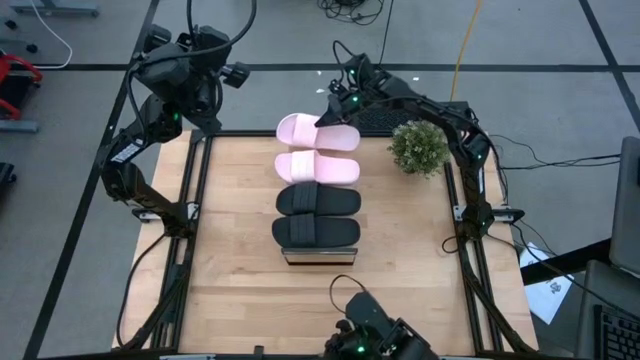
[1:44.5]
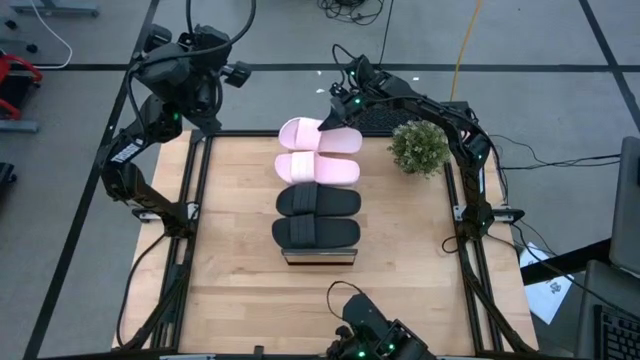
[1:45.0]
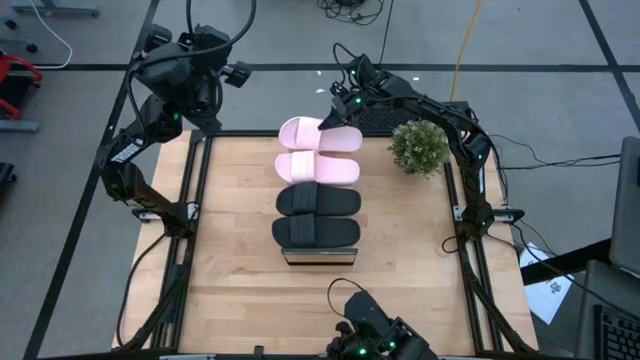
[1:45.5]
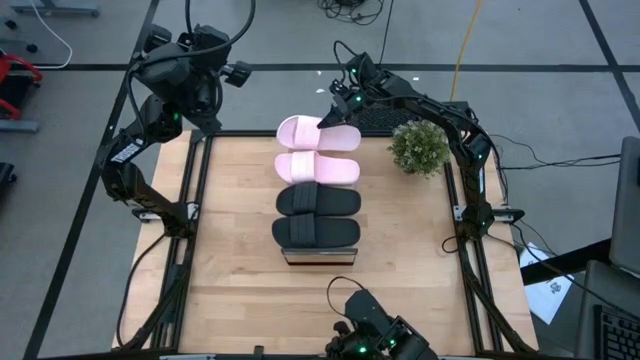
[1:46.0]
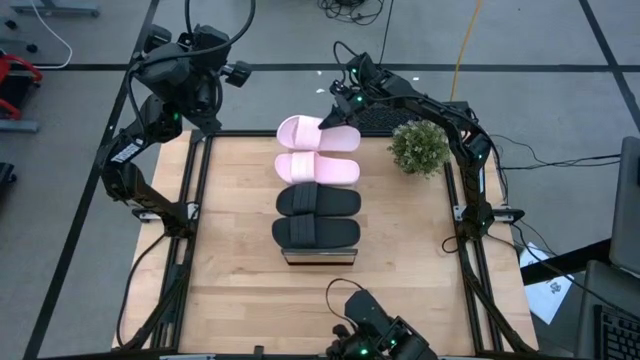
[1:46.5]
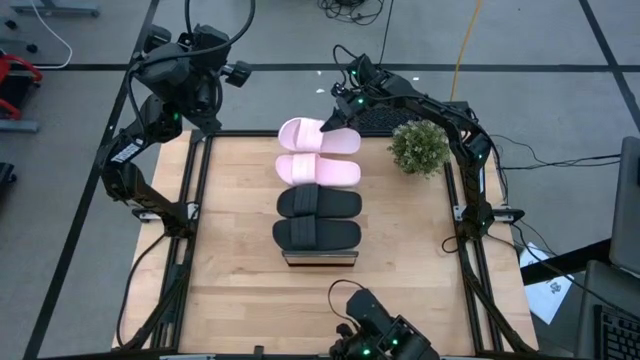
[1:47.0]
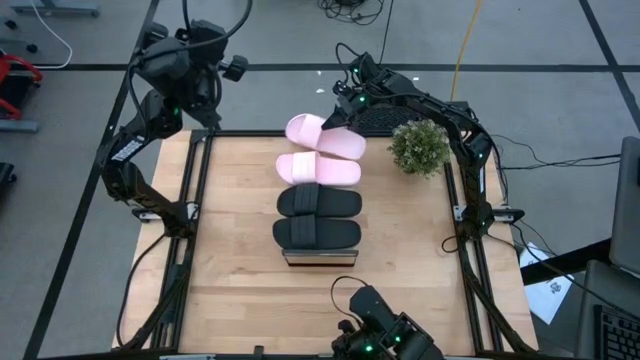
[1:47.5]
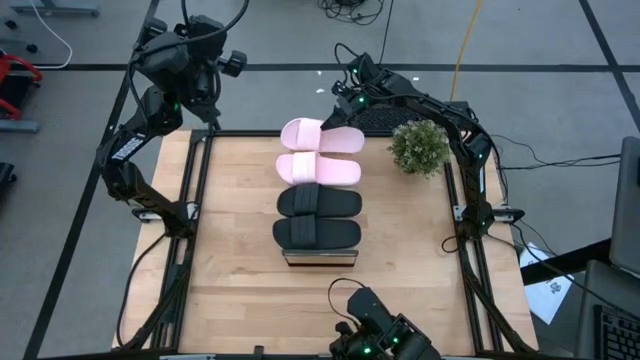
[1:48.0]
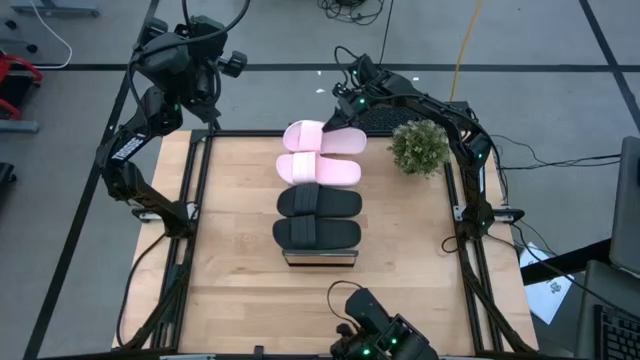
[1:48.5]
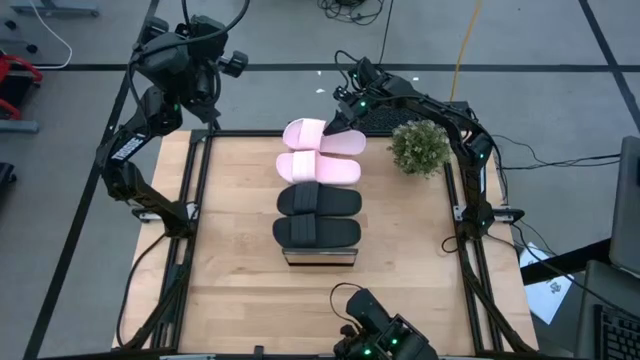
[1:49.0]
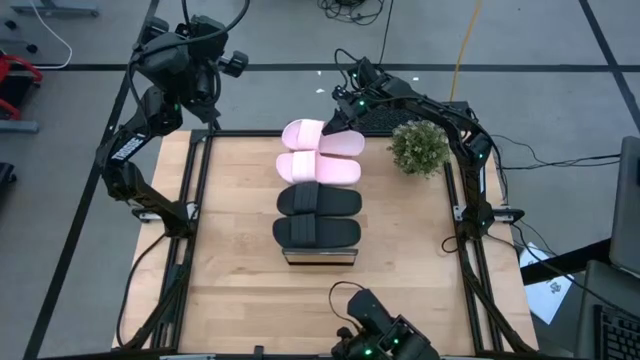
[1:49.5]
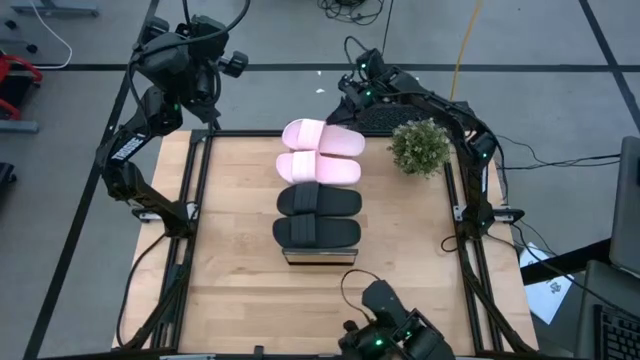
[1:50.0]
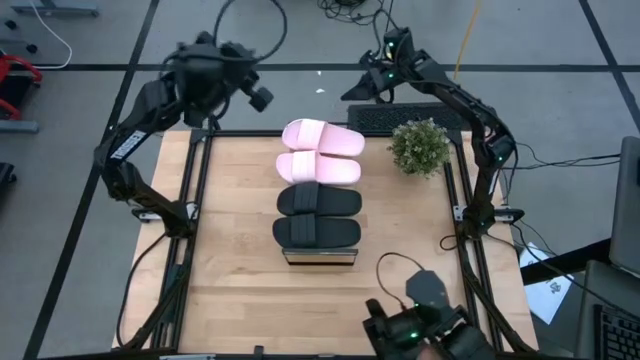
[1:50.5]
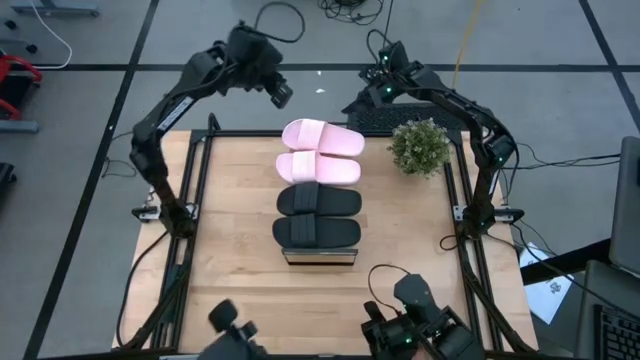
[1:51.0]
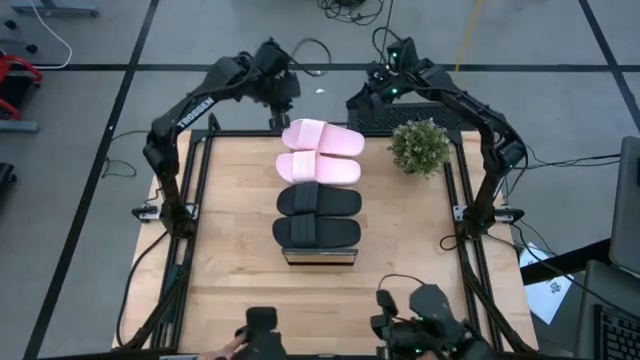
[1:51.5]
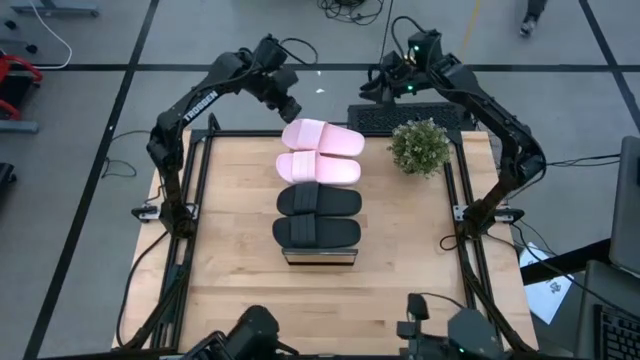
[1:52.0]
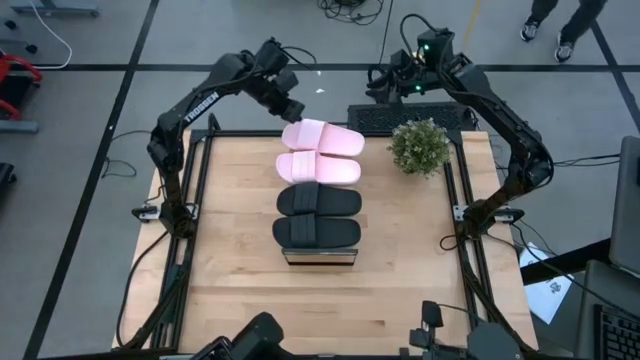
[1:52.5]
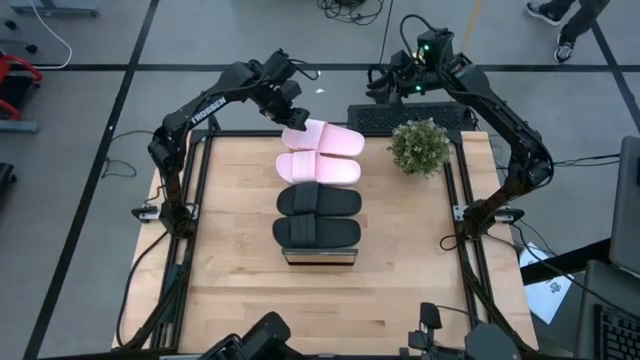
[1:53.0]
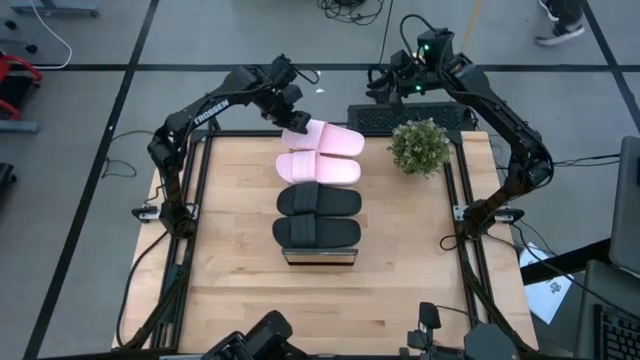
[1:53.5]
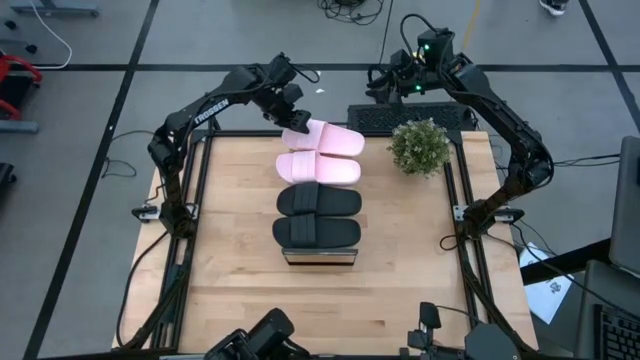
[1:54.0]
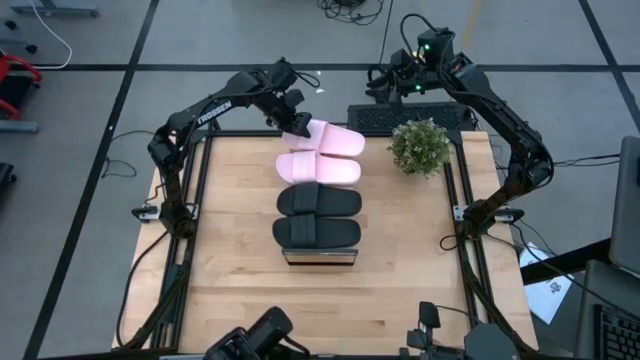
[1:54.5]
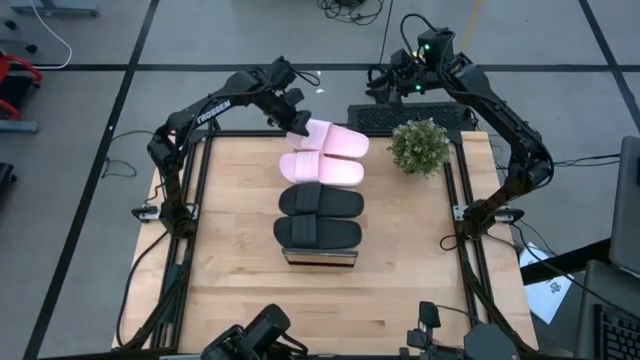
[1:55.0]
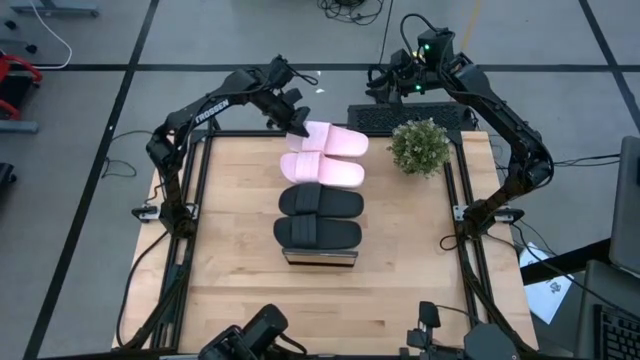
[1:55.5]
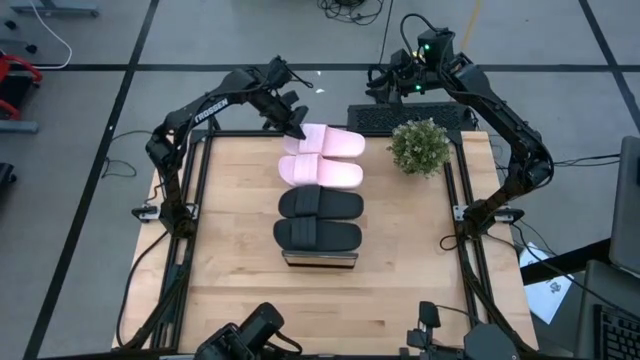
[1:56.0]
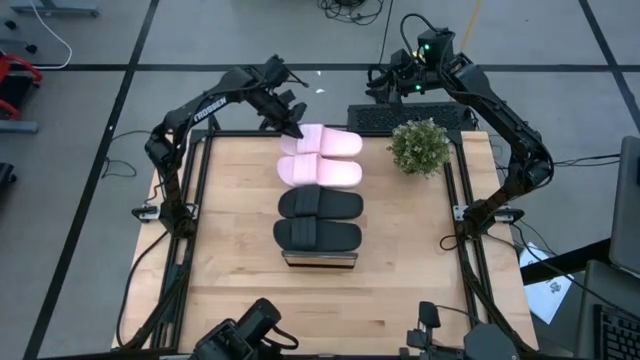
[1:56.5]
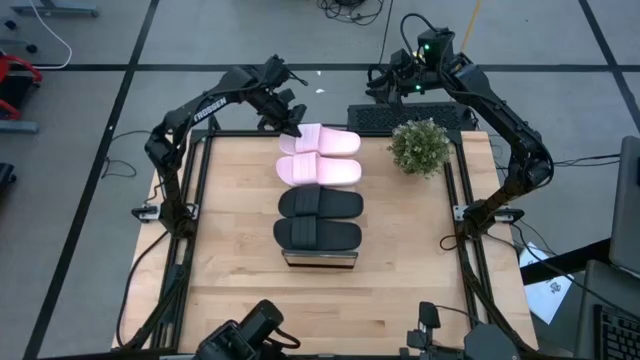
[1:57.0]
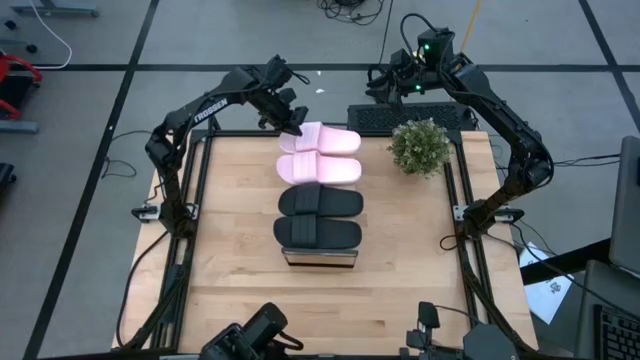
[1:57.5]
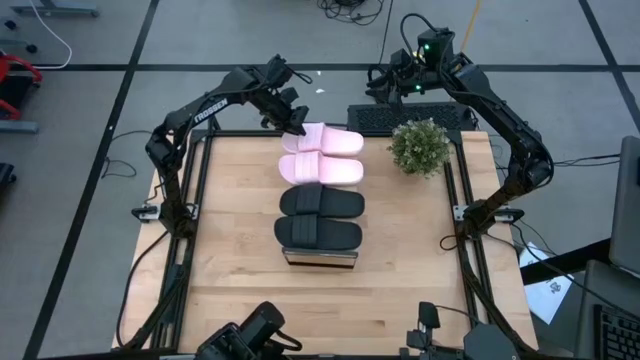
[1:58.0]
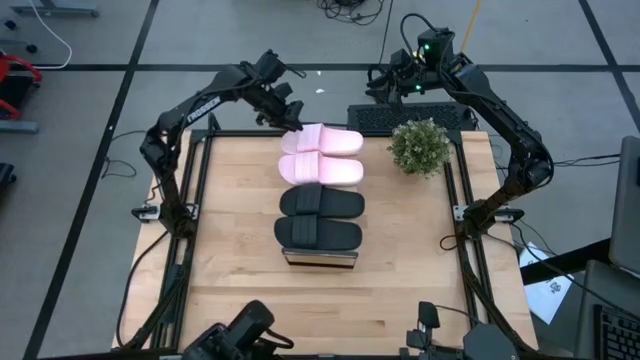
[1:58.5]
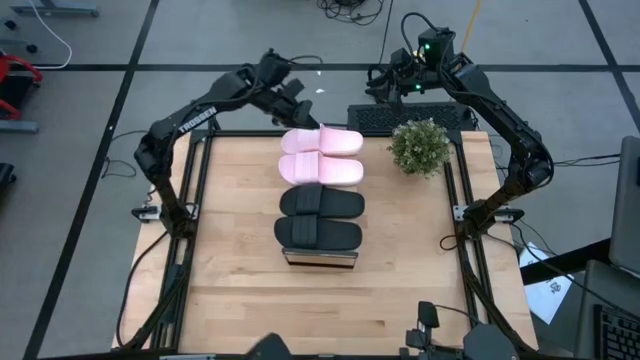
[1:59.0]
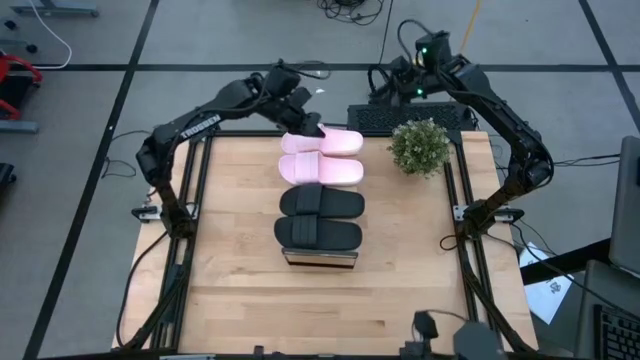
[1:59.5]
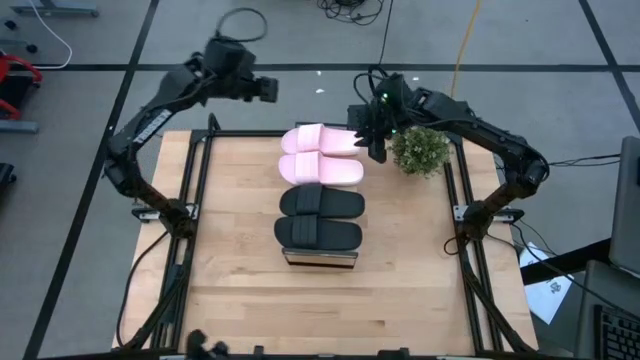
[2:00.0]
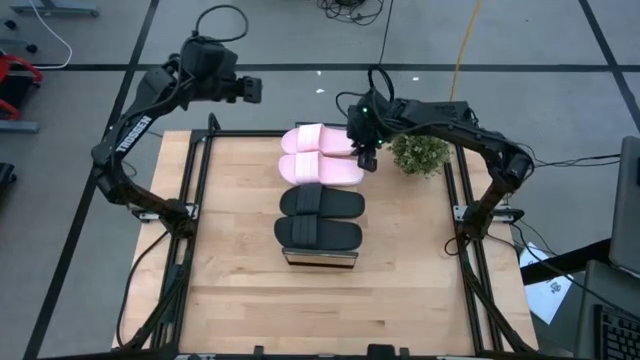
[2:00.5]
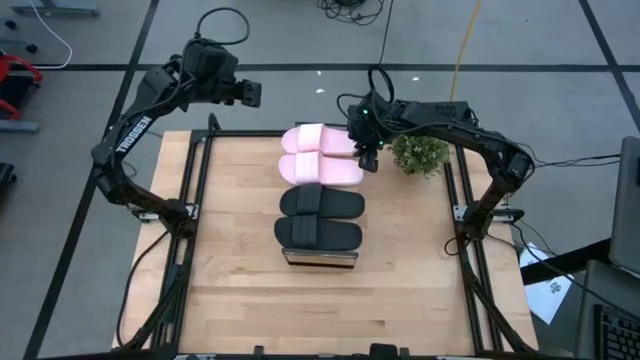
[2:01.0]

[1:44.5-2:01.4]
Task: Pick and place slides into the shelf
Put the pink slide on the shelf

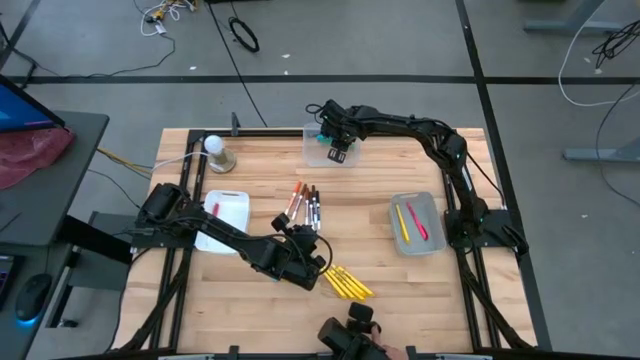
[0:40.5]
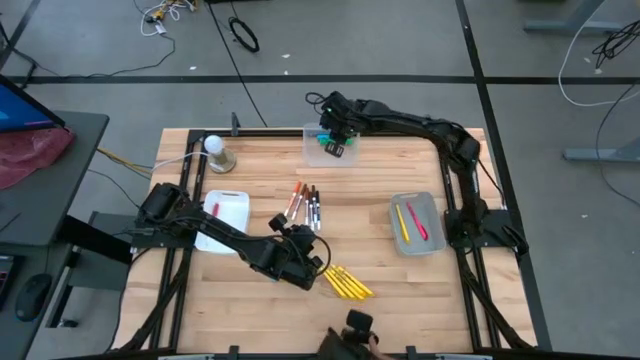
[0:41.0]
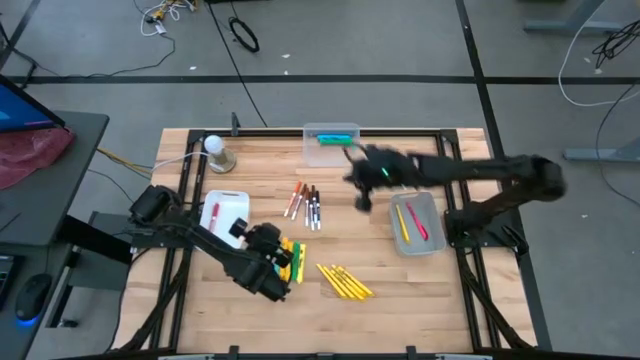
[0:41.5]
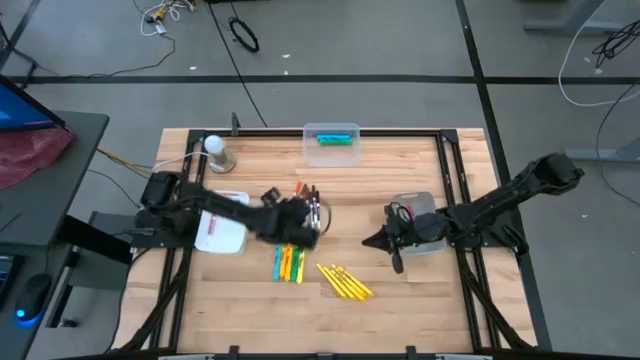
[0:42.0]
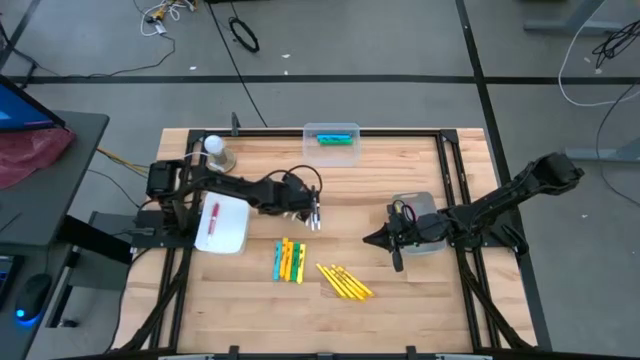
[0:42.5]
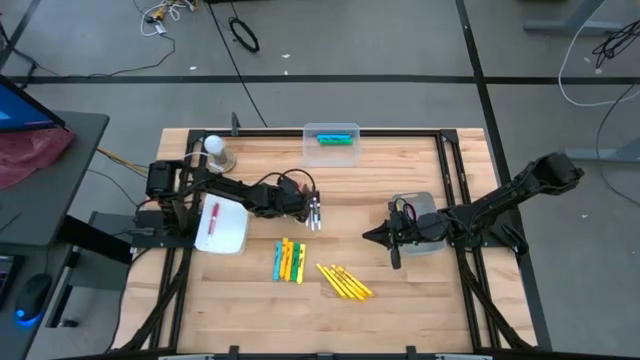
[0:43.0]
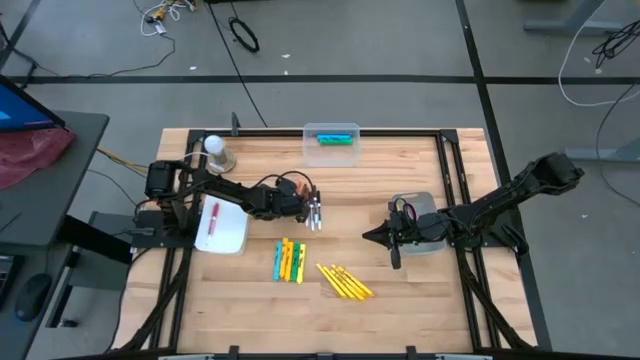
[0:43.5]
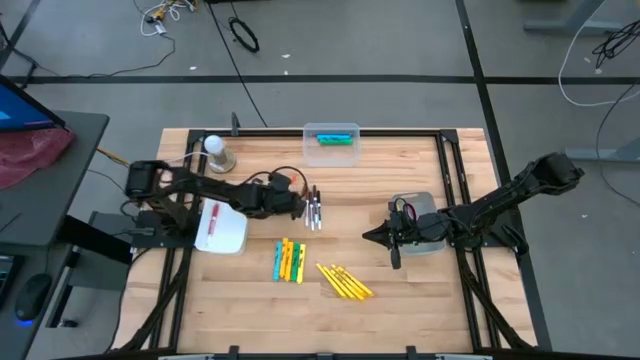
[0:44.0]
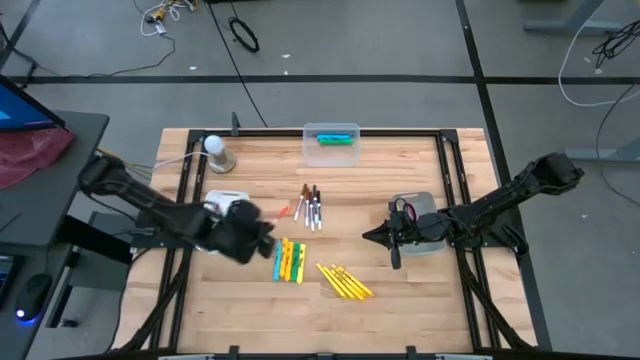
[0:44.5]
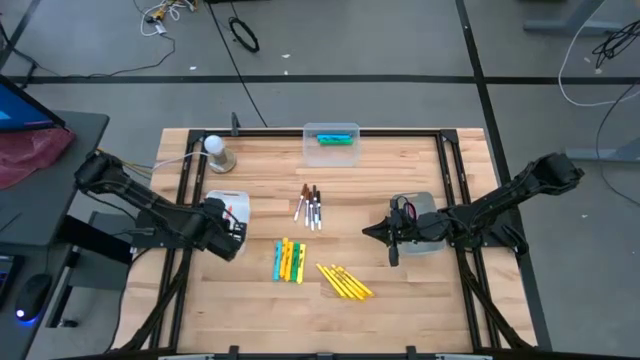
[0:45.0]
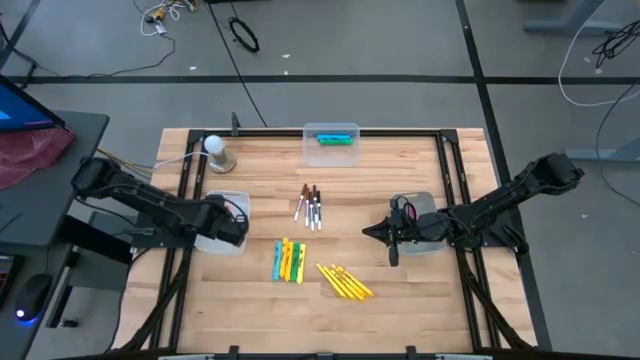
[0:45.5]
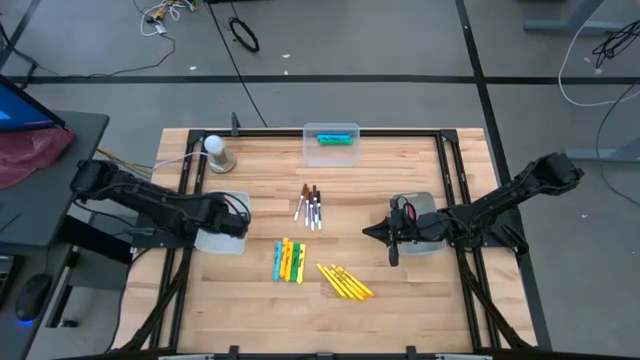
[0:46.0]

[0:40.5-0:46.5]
Task: Pick & Place Markers
Put the orange marker pen into the white bin
